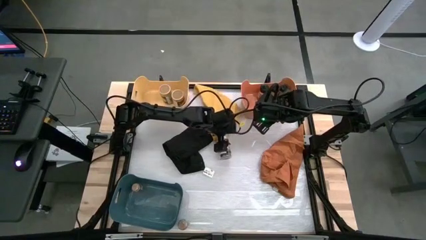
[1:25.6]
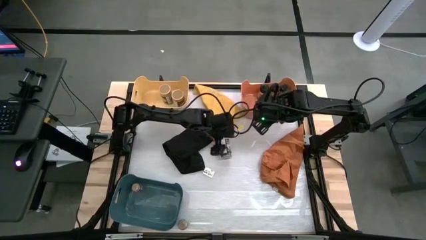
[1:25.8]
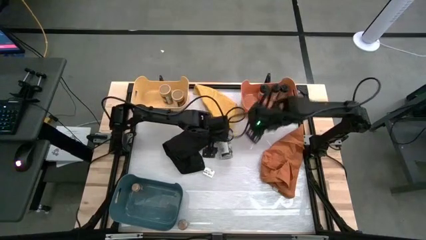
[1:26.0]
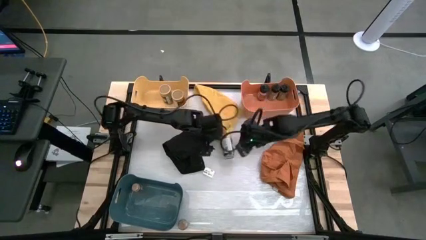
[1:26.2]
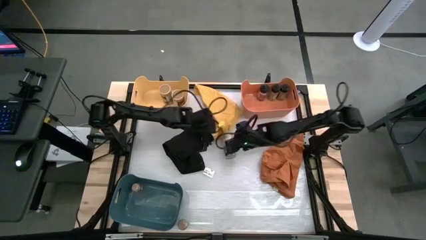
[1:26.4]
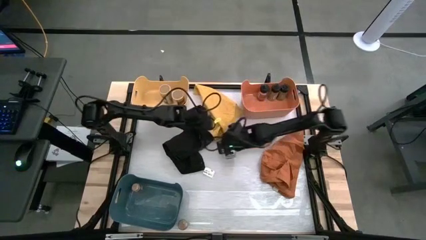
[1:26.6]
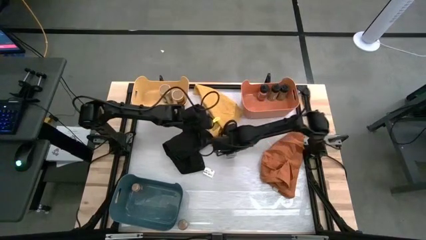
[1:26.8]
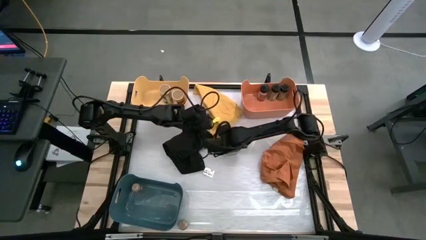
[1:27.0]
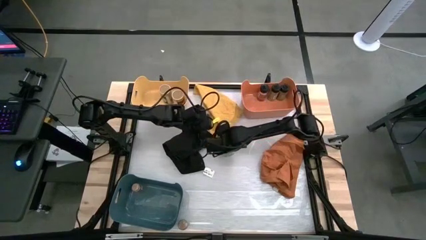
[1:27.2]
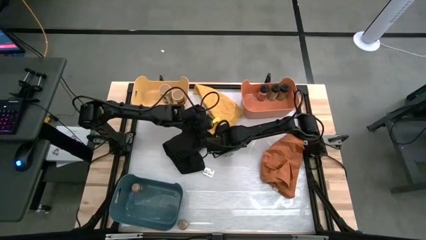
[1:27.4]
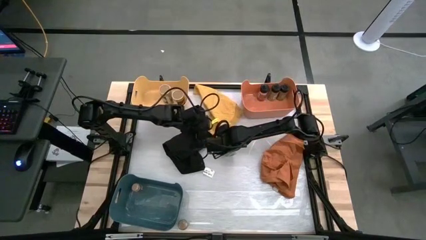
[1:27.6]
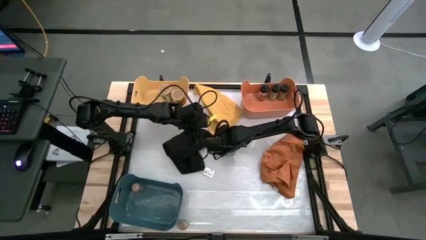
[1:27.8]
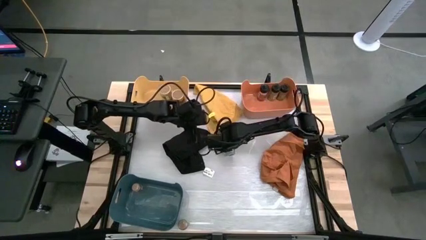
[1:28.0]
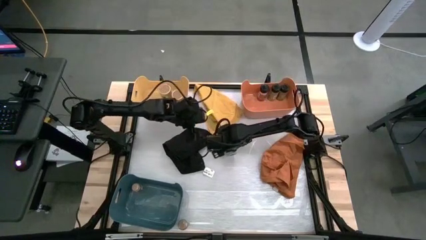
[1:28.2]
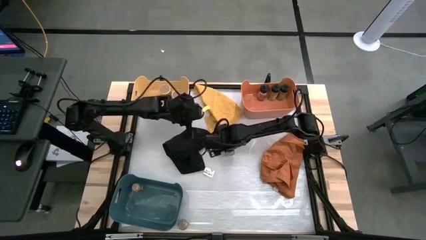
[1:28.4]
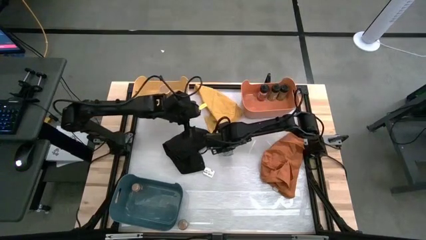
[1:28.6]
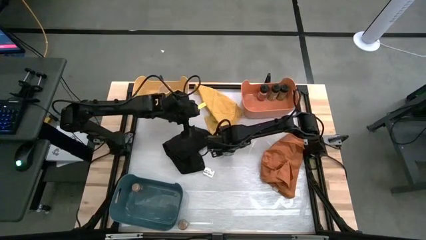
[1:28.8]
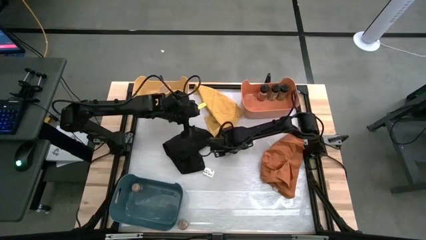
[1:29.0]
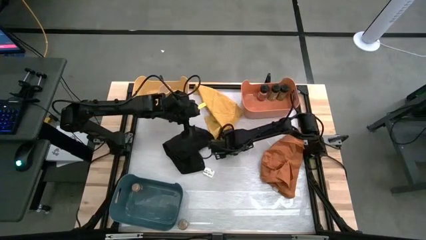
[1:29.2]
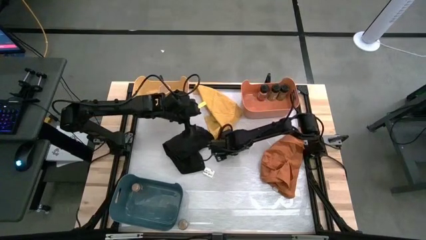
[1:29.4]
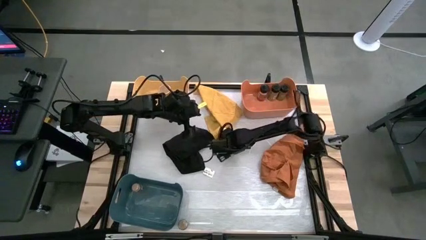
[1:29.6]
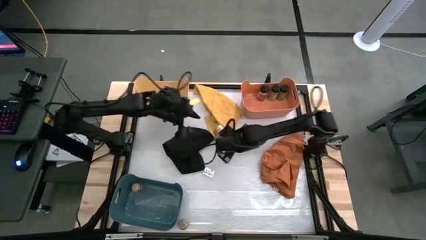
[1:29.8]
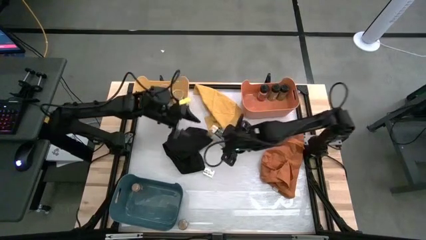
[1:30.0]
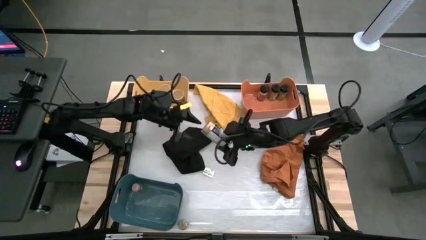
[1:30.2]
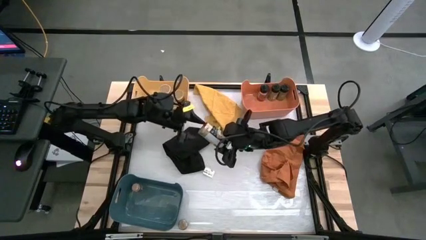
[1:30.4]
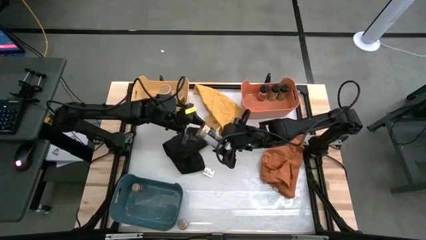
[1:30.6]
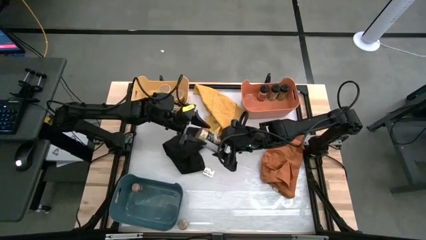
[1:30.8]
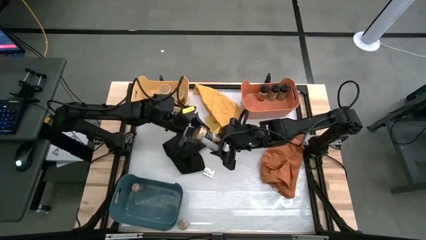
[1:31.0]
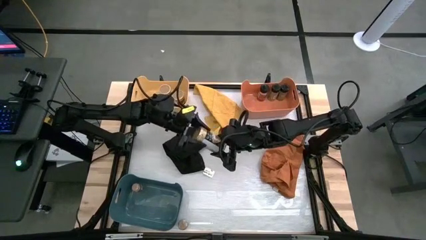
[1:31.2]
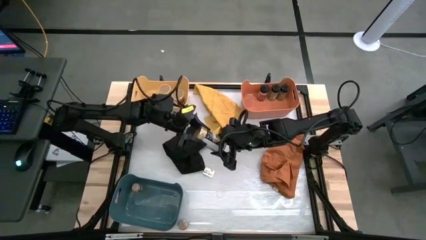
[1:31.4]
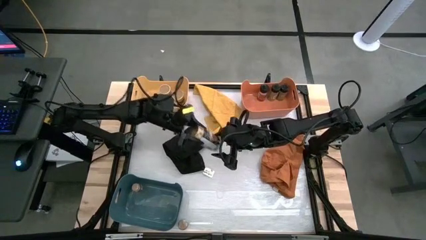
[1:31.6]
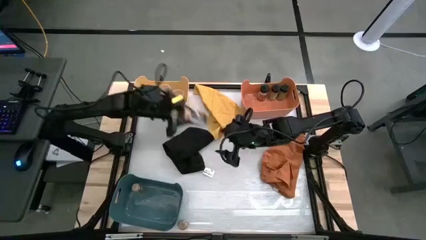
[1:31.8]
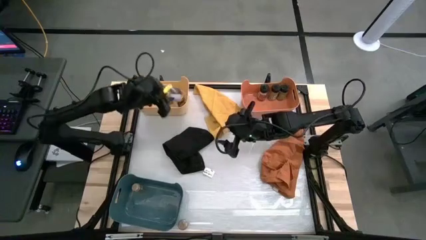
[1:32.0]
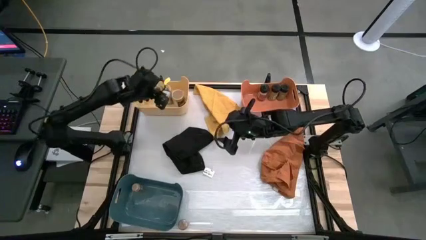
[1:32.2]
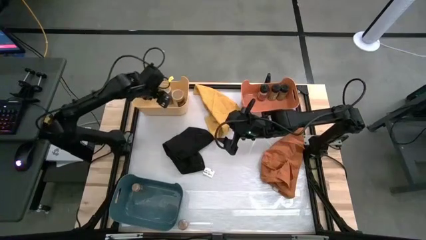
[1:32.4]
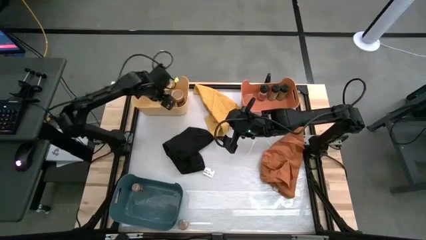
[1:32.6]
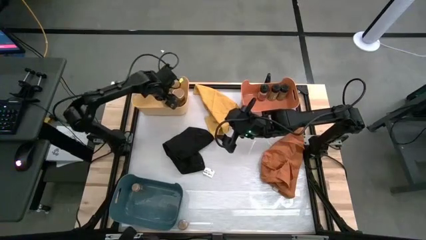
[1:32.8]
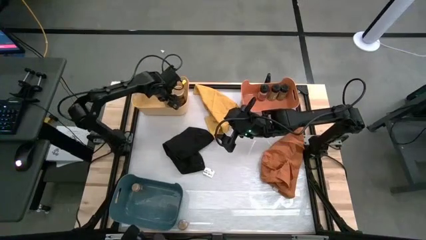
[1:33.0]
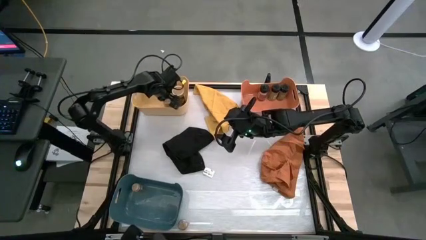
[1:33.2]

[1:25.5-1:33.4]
Task: Sort spices by type
Put the gold seasoning bottle into the yellow bin

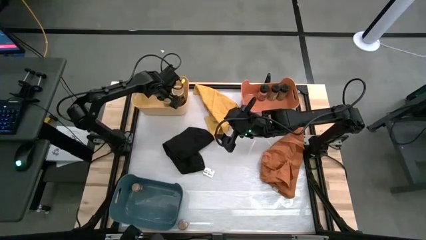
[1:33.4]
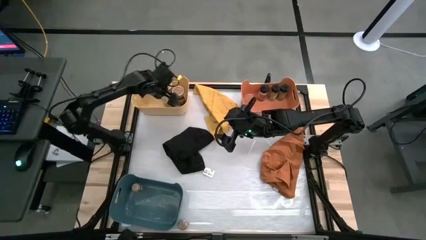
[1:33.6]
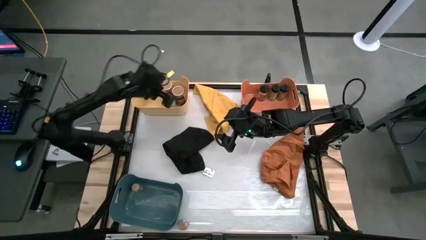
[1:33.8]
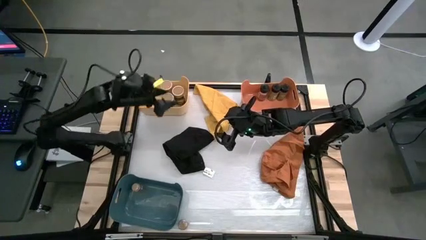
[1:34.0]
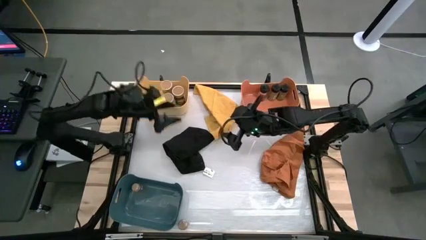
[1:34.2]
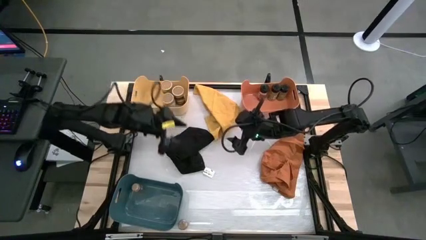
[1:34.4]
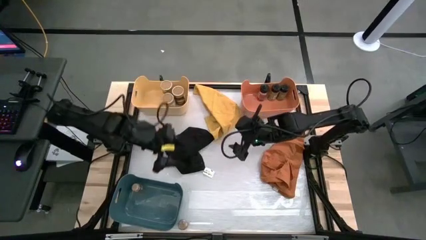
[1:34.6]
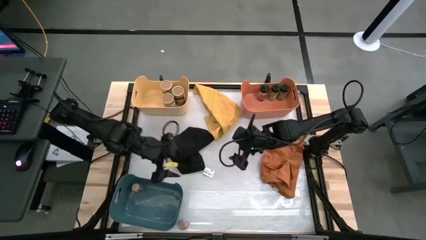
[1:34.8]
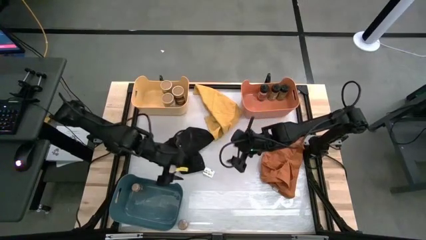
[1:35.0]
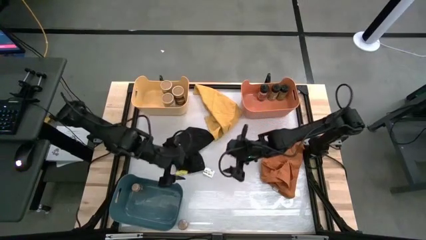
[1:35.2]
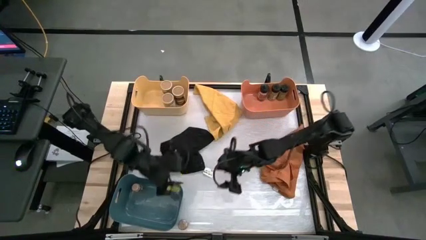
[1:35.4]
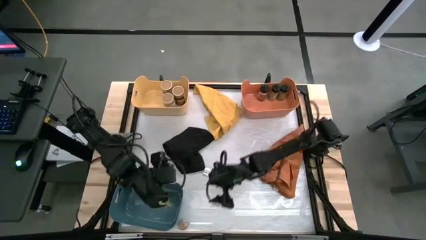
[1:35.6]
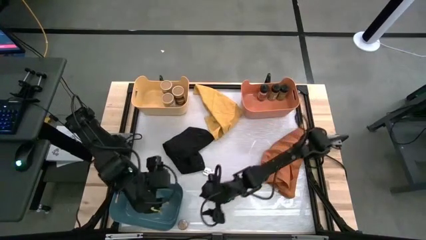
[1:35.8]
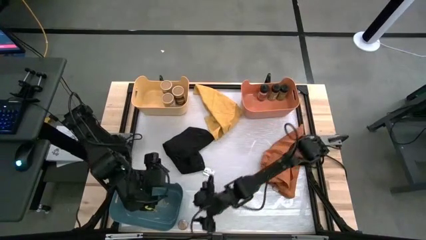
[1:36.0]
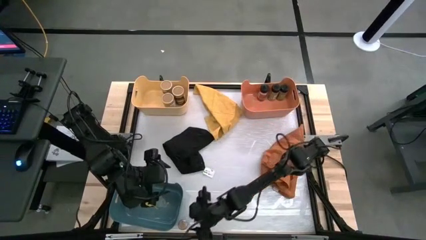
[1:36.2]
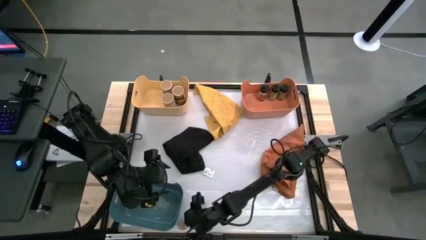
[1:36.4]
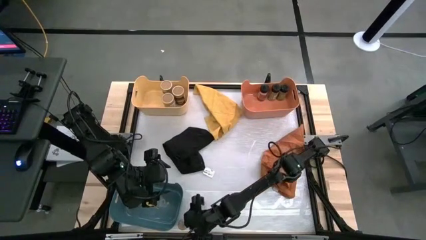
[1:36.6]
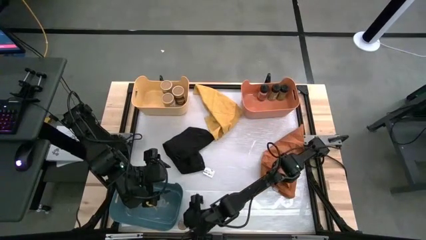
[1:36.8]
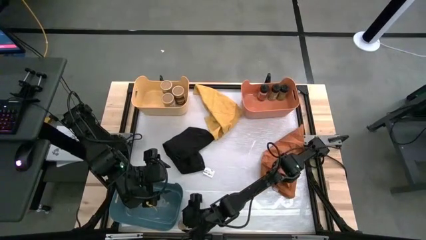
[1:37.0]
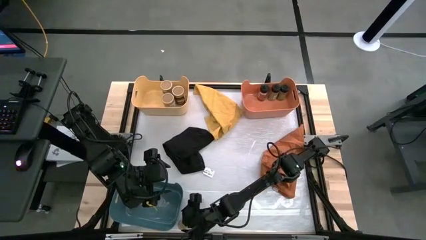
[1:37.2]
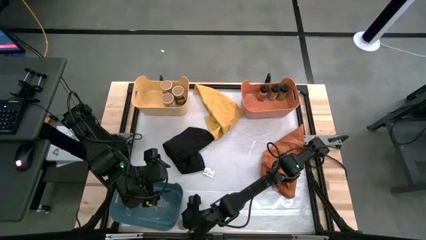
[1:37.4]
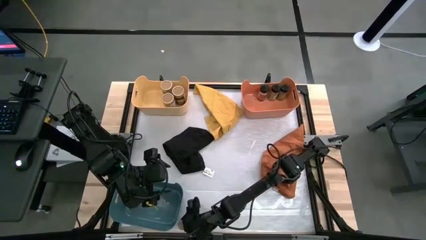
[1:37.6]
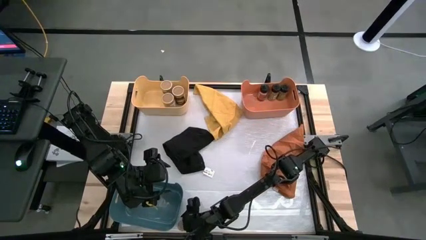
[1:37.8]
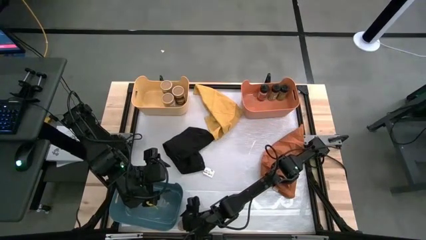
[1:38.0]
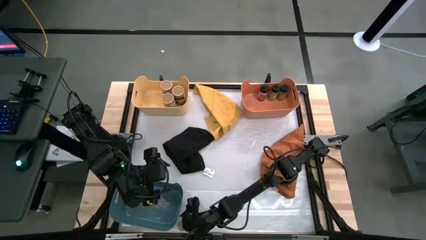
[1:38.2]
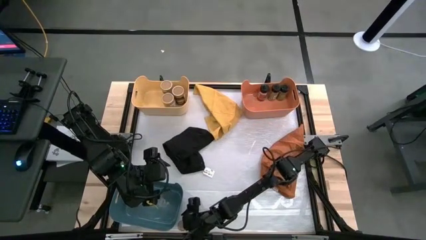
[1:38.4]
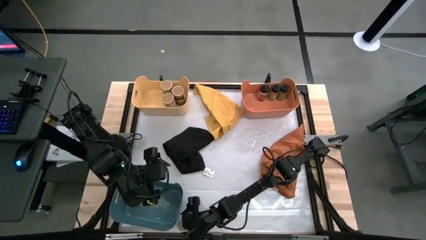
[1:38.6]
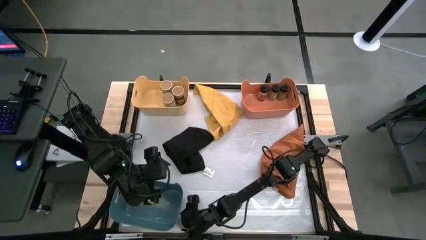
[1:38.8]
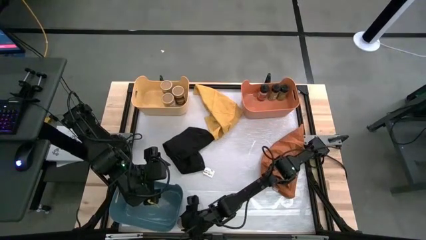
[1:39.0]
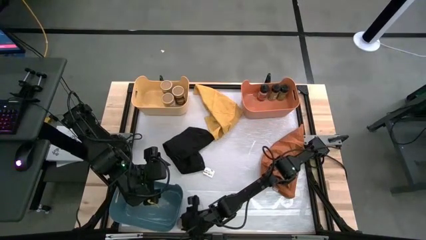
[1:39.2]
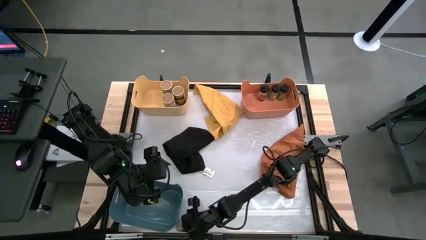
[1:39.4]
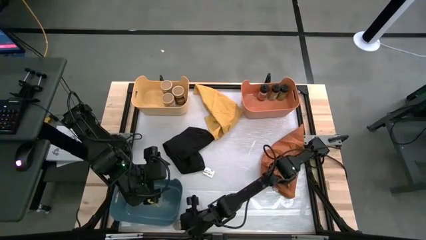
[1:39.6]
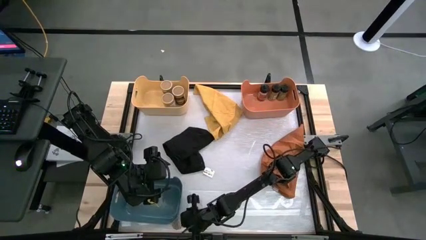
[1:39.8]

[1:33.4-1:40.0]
Put the brown seasoning bottle into the blue bin
